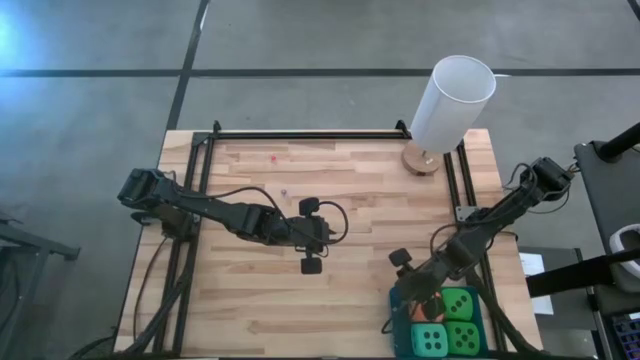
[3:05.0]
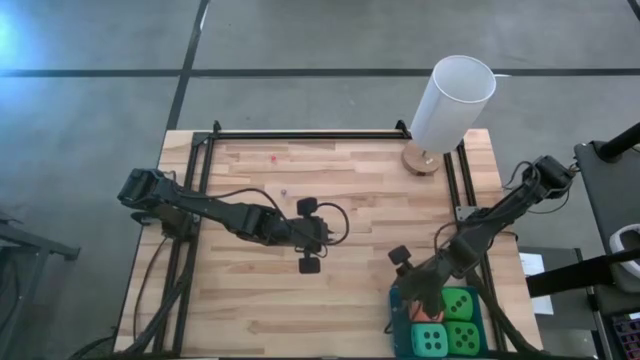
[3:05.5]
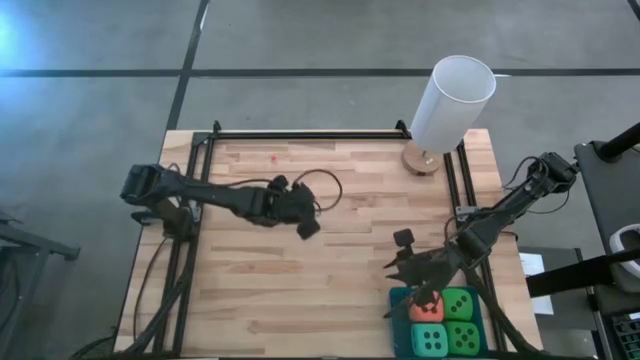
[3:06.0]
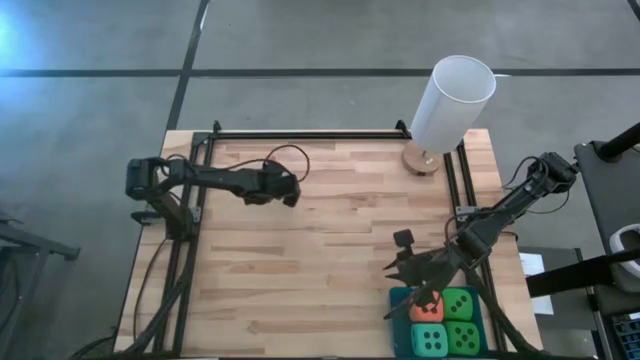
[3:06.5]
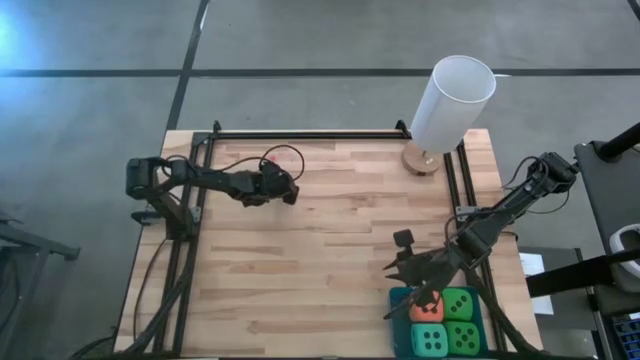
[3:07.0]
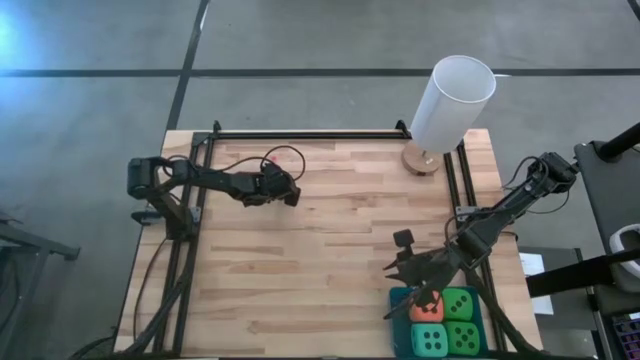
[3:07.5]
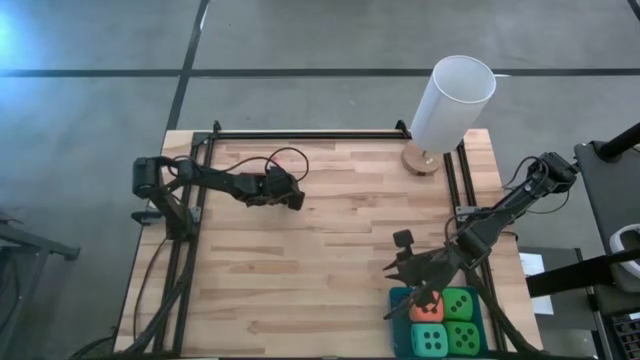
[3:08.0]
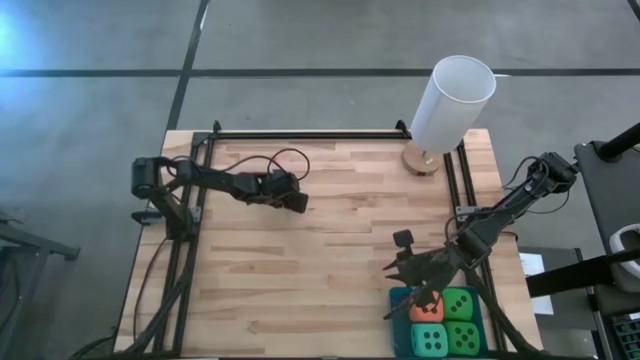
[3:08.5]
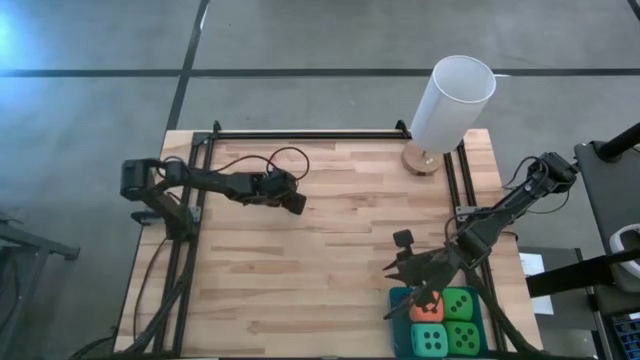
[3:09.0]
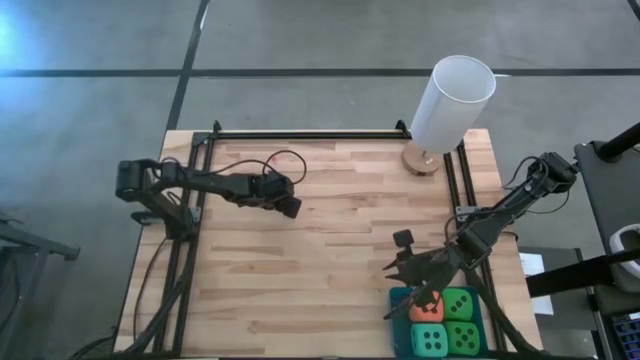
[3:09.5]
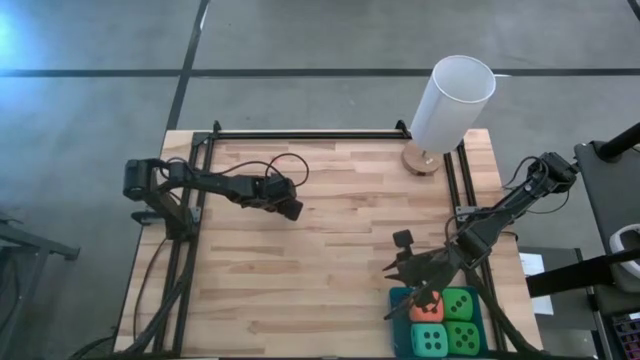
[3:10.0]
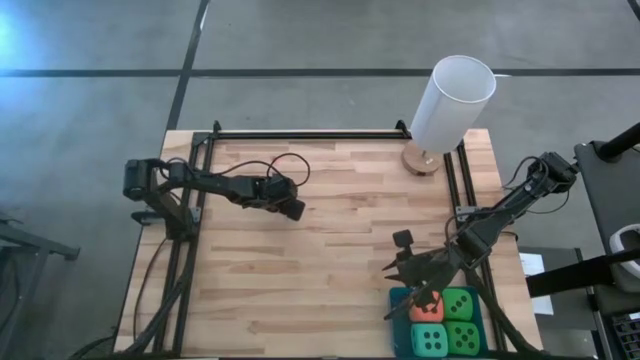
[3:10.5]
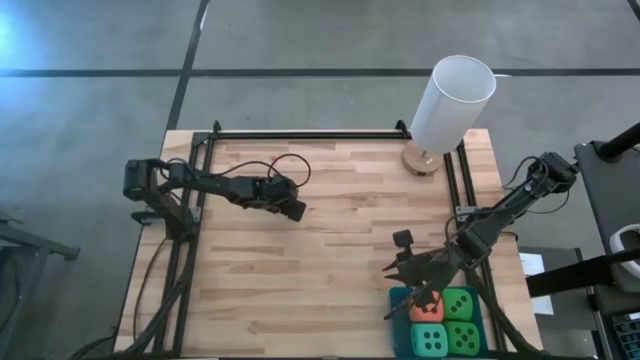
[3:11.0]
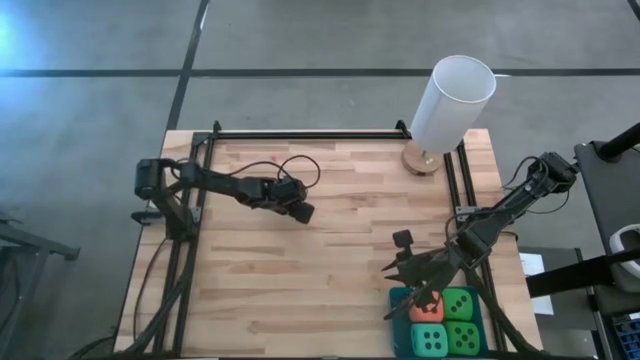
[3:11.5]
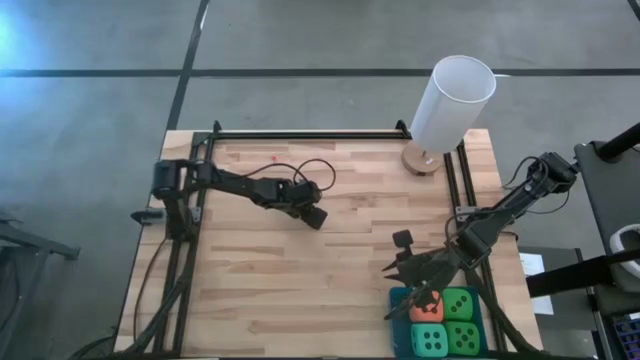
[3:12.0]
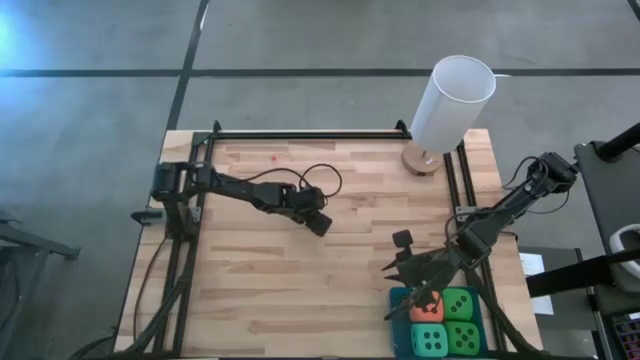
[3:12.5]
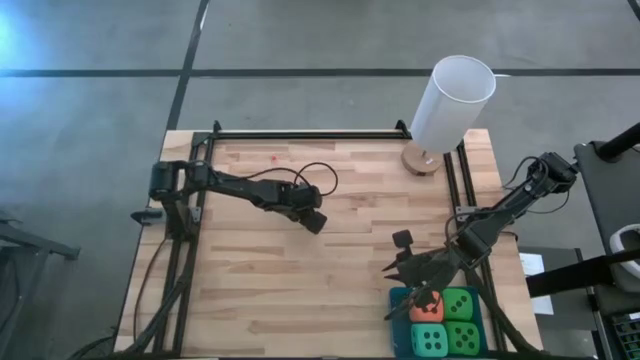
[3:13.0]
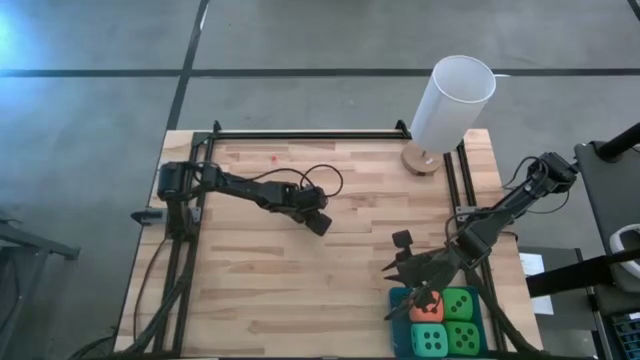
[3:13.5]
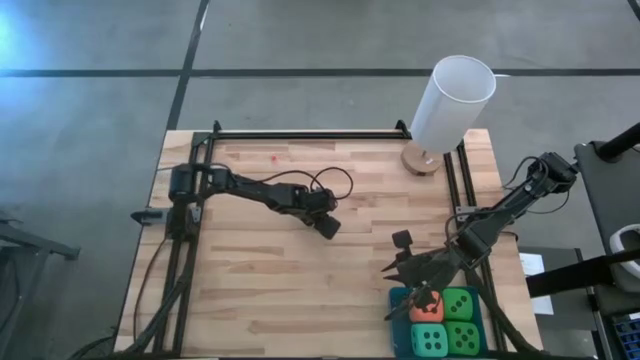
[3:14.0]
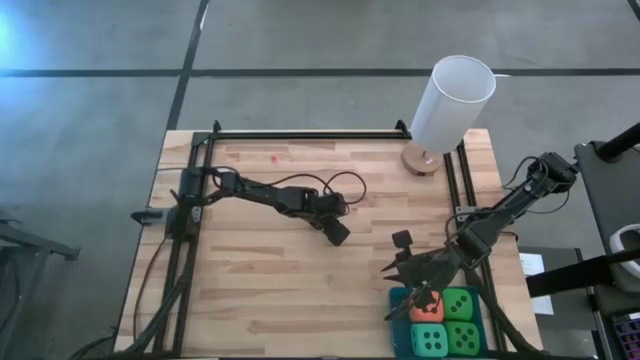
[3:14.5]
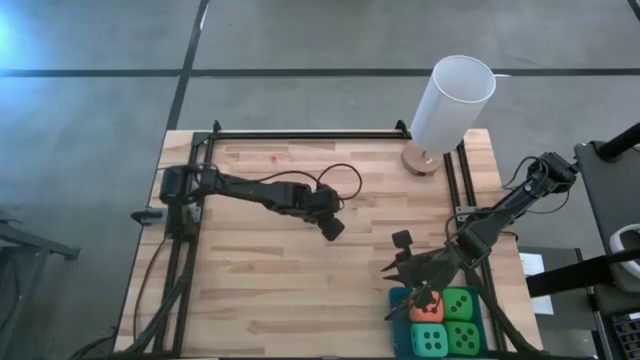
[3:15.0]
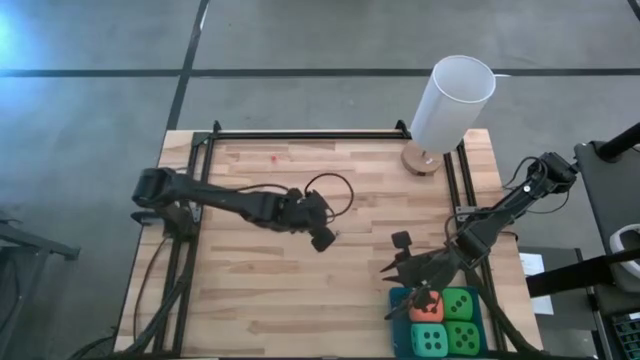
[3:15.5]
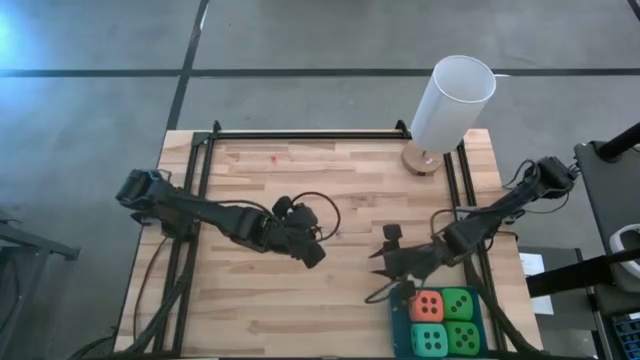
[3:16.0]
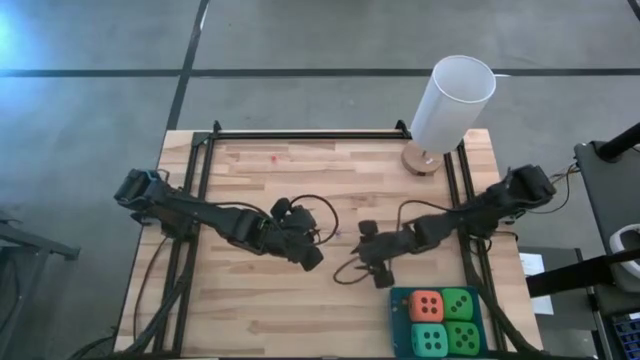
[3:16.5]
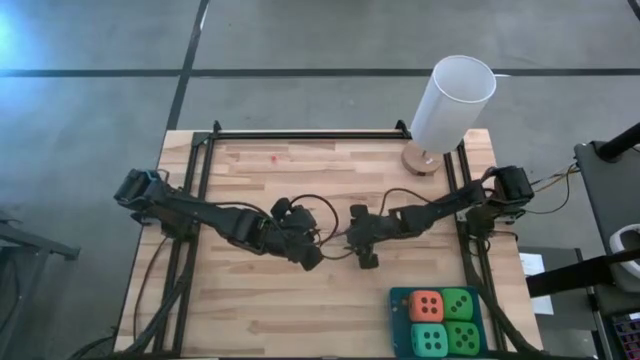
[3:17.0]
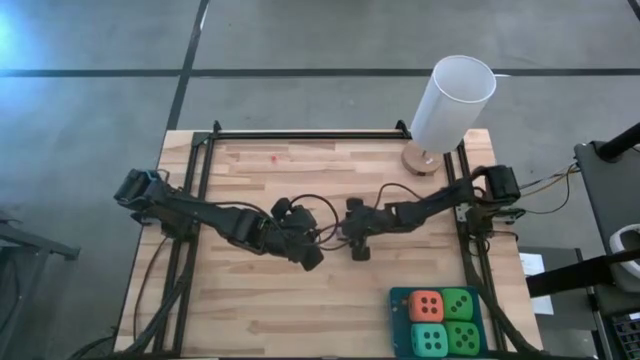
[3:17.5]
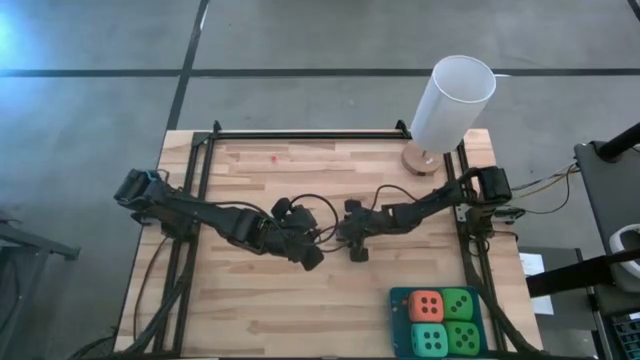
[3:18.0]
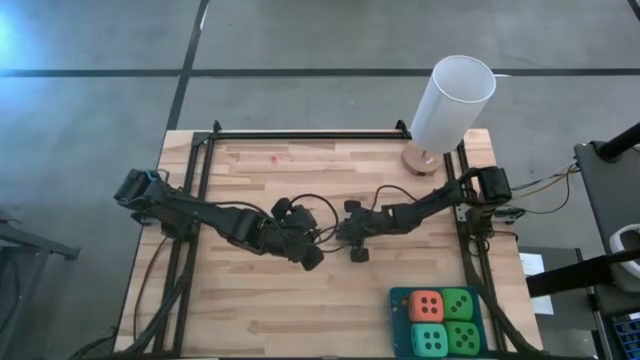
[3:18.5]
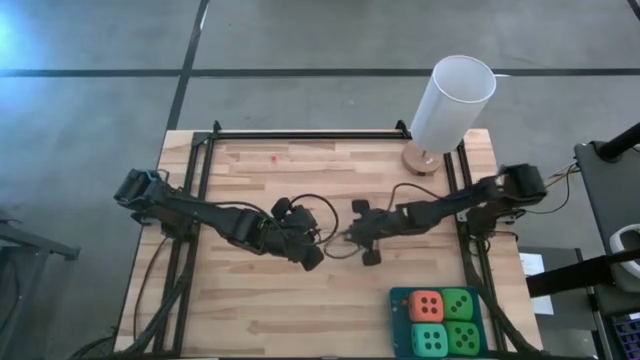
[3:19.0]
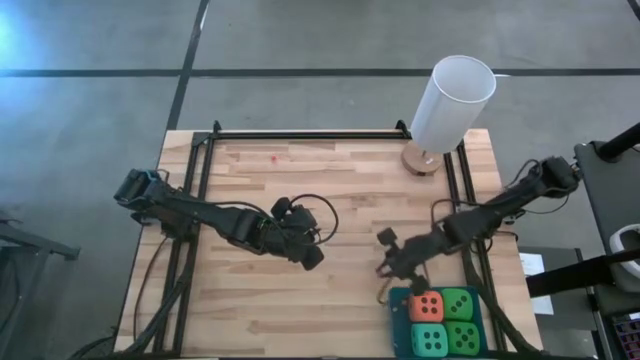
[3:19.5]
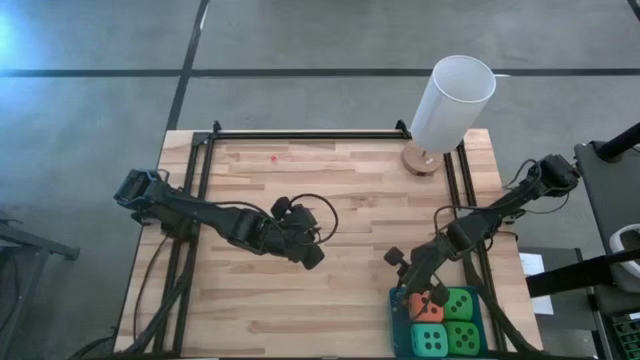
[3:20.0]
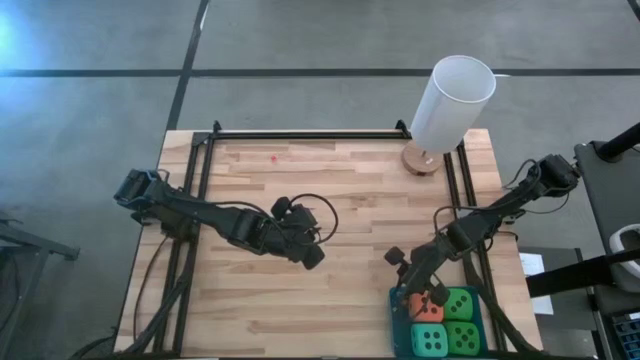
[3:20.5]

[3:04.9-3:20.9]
Task: Pick & Place Dice
Put the small purple die into the blue bin

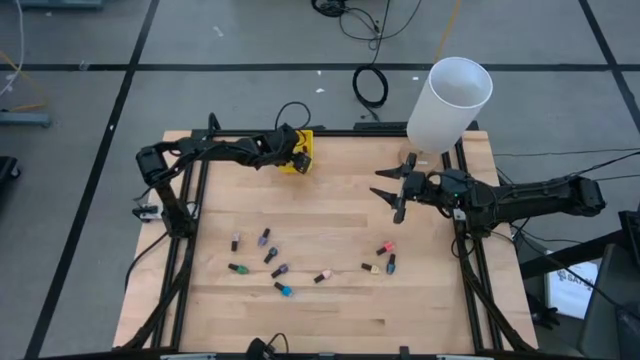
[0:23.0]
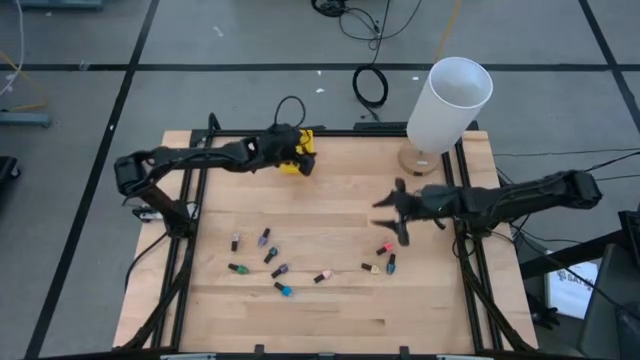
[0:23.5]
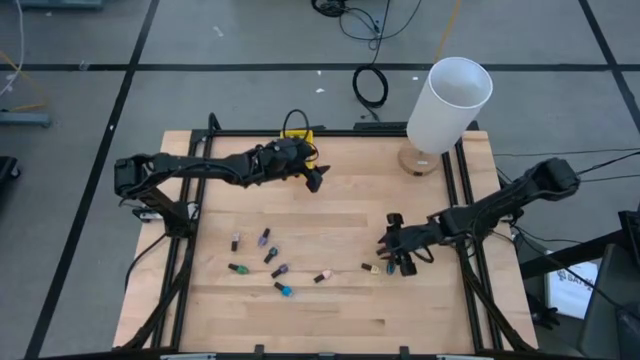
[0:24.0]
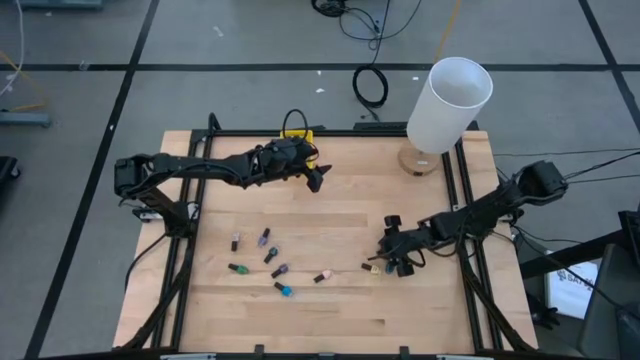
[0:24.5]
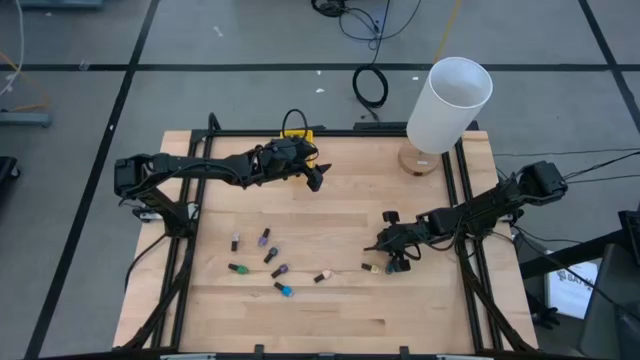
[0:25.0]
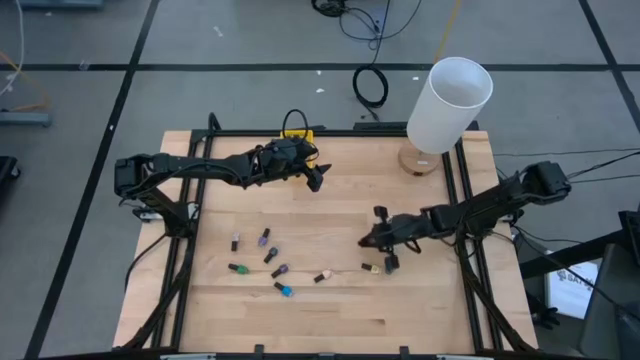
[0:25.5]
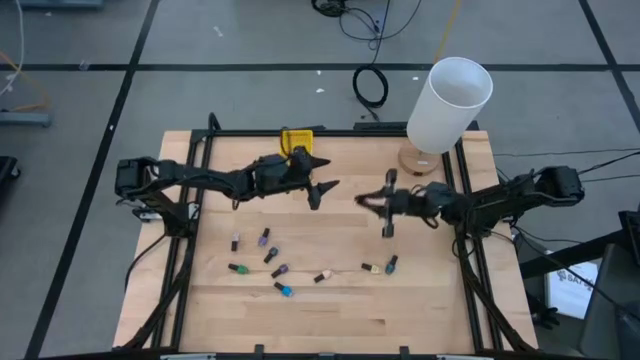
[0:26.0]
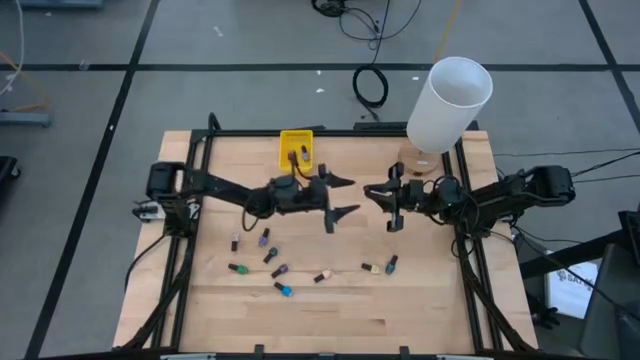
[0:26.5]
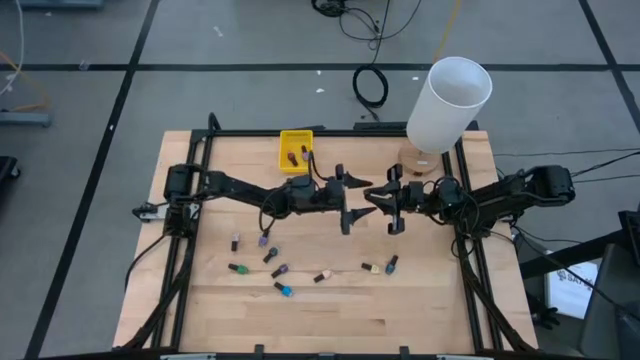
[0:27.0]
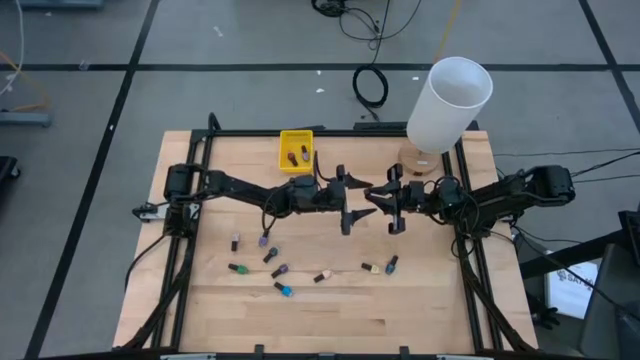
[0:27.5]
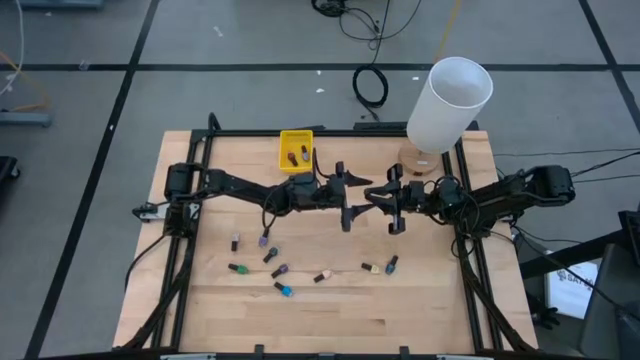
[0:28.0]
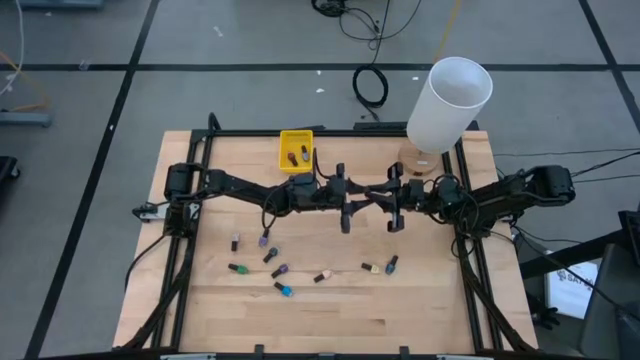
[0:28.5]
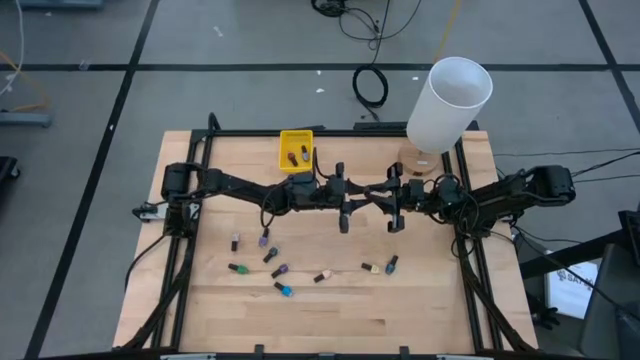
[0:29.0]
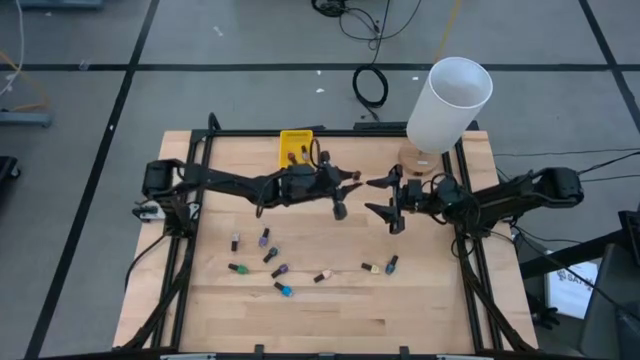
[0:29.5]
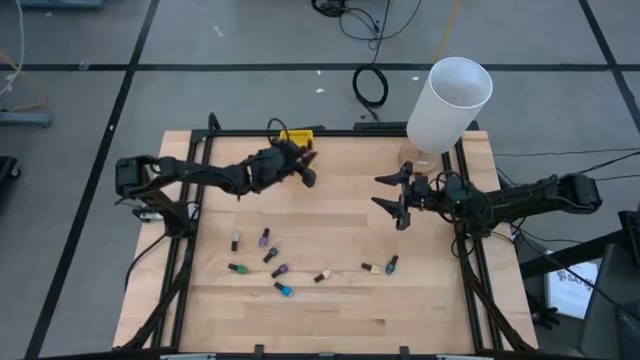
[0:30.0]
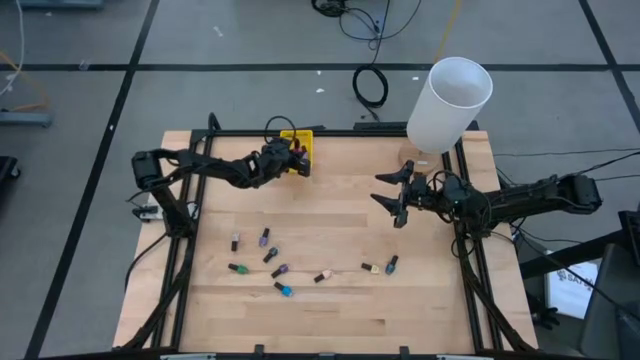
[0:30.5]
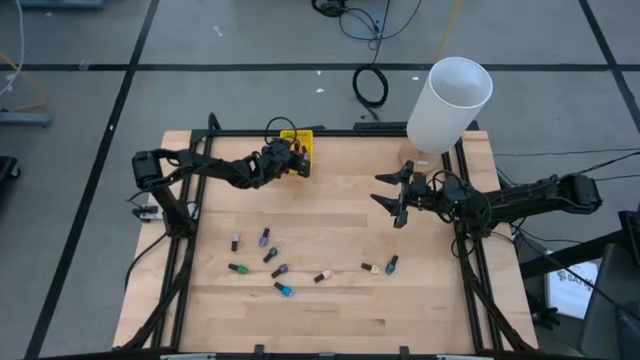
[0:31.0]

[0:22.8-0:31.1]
Task: Pick & Place Nail Polish
Put the dark pink nail polish bottle into the yellow bin
